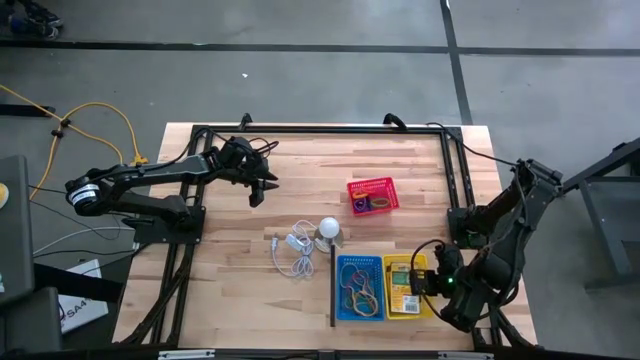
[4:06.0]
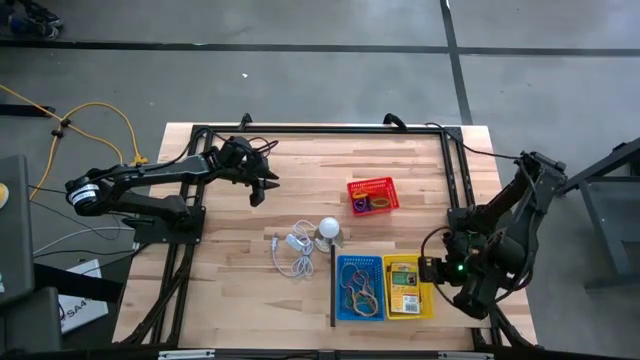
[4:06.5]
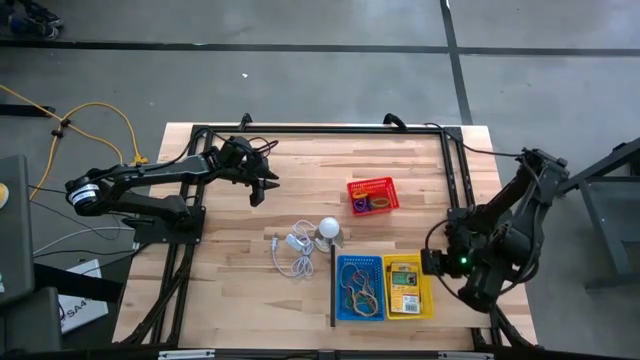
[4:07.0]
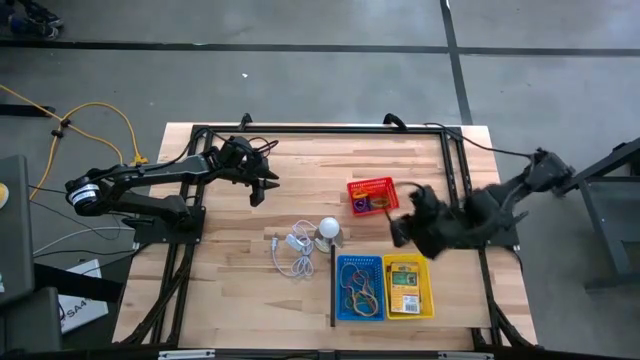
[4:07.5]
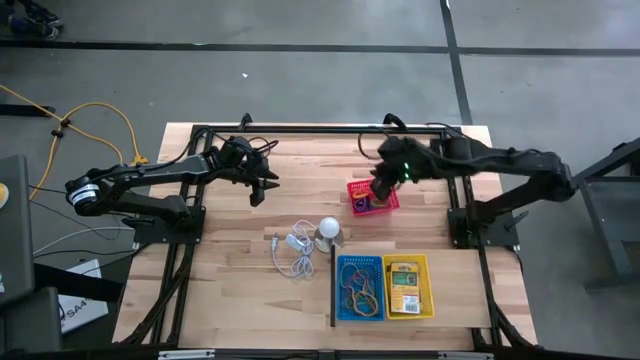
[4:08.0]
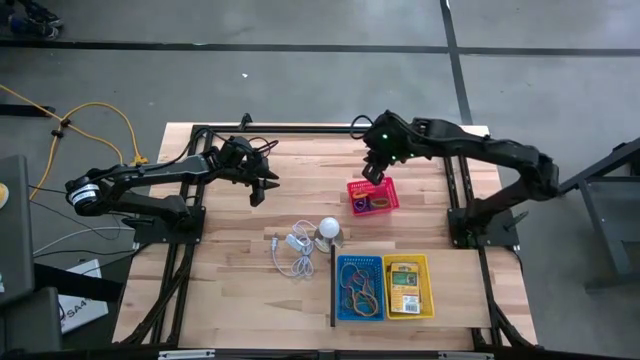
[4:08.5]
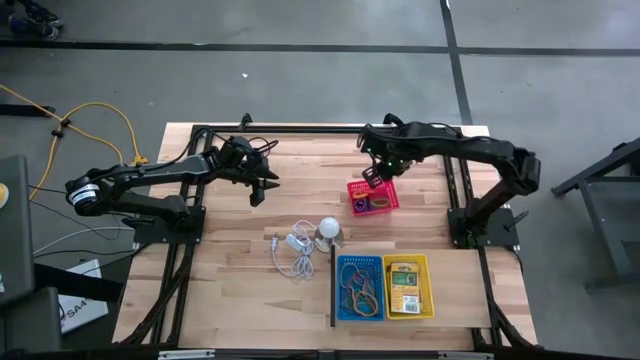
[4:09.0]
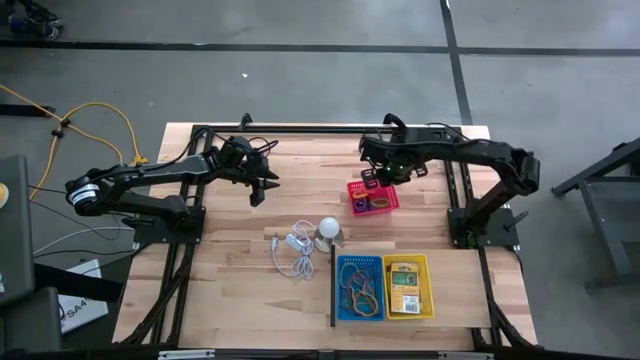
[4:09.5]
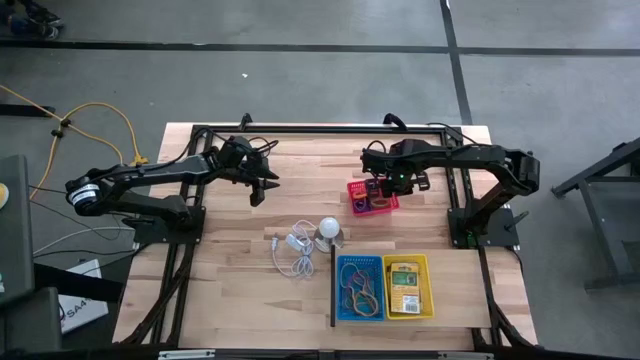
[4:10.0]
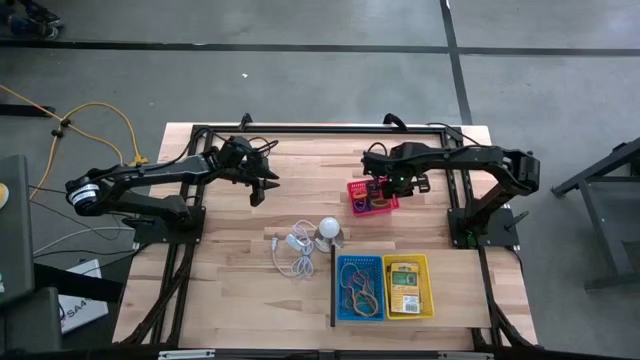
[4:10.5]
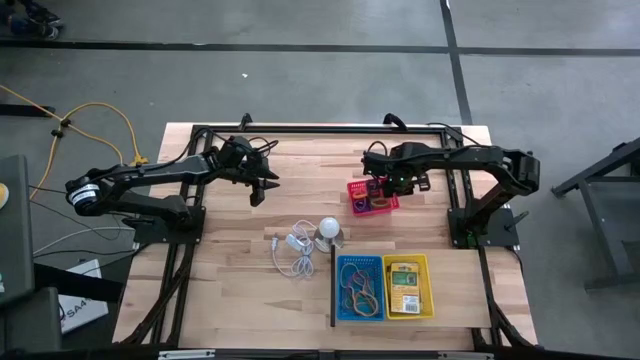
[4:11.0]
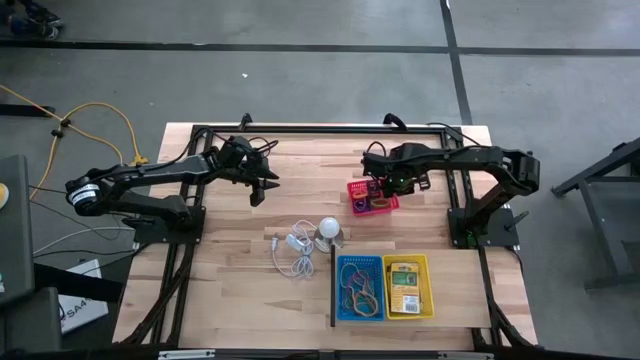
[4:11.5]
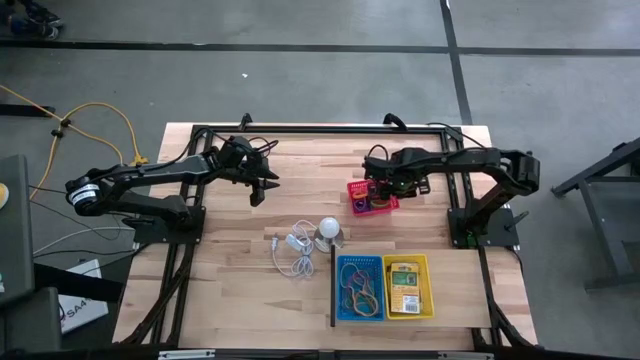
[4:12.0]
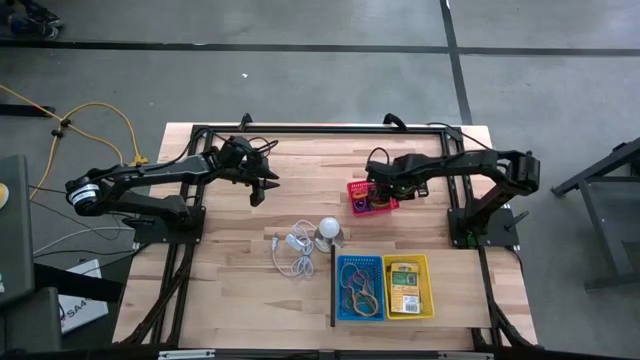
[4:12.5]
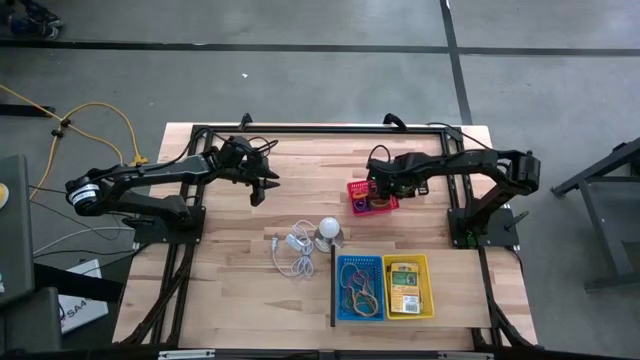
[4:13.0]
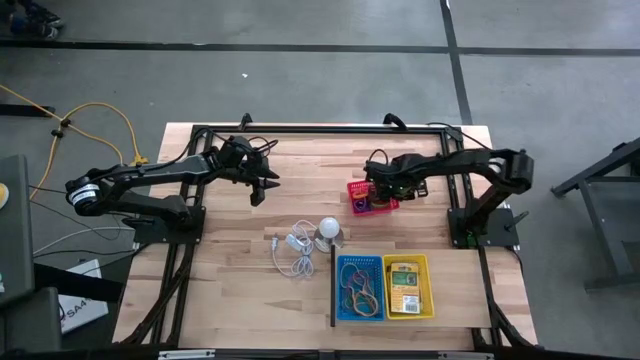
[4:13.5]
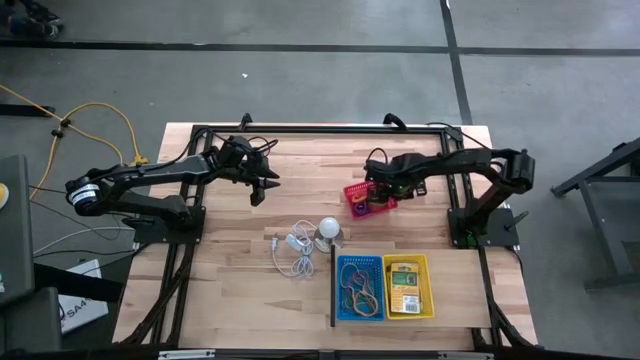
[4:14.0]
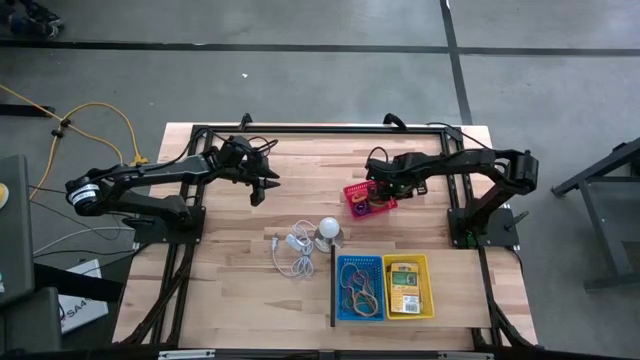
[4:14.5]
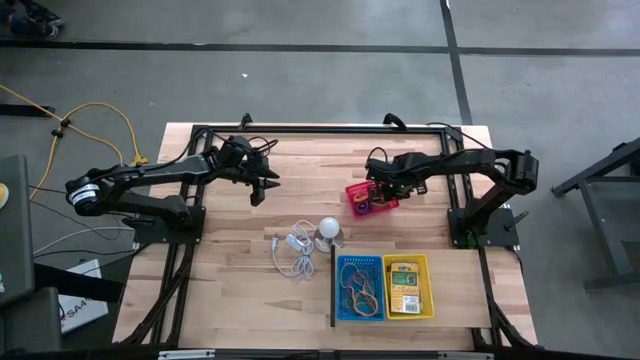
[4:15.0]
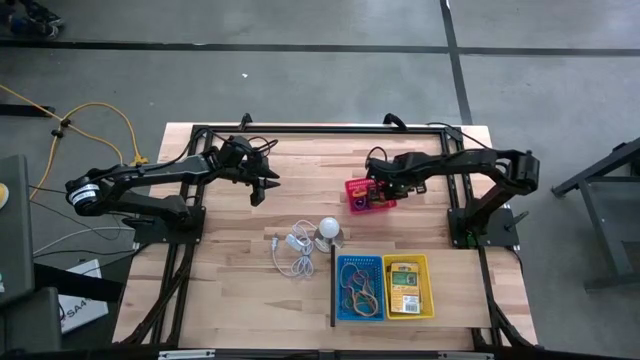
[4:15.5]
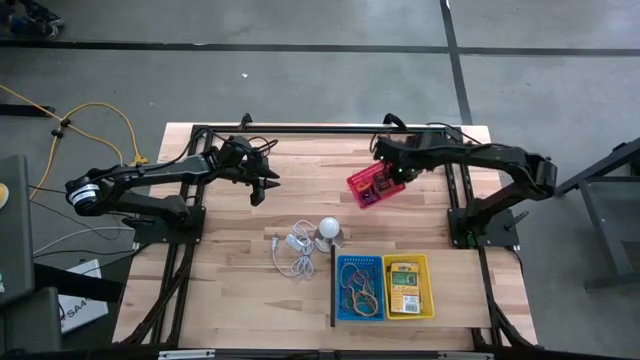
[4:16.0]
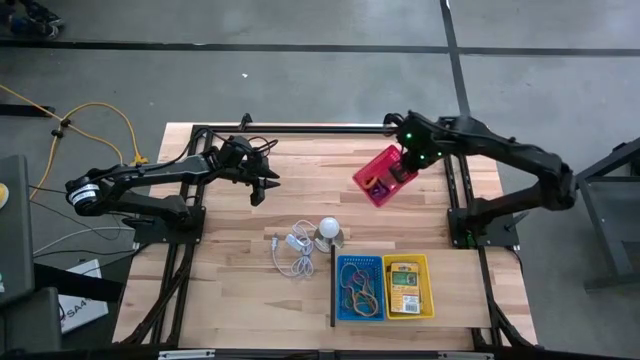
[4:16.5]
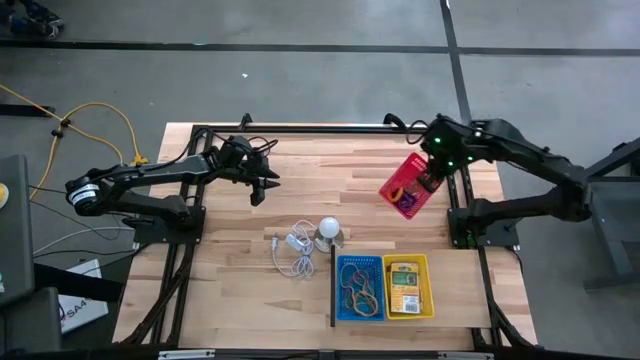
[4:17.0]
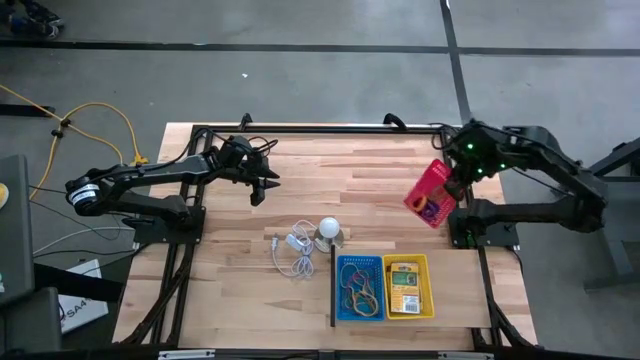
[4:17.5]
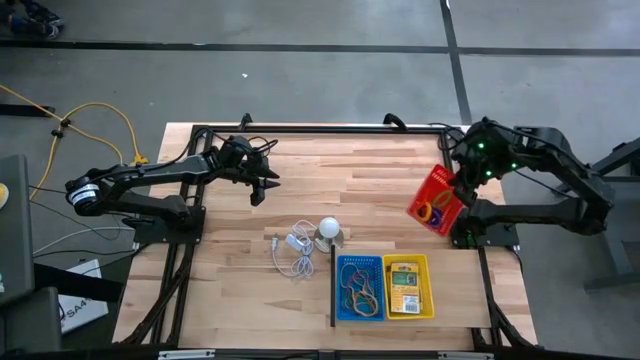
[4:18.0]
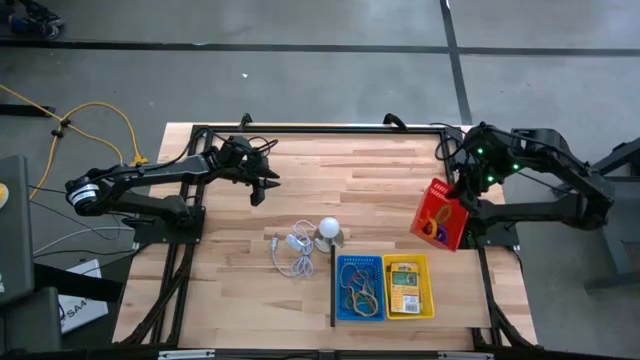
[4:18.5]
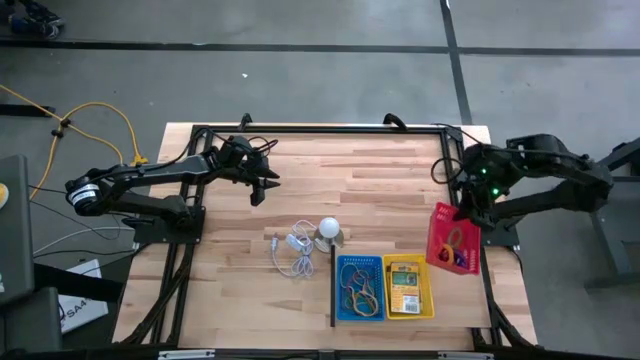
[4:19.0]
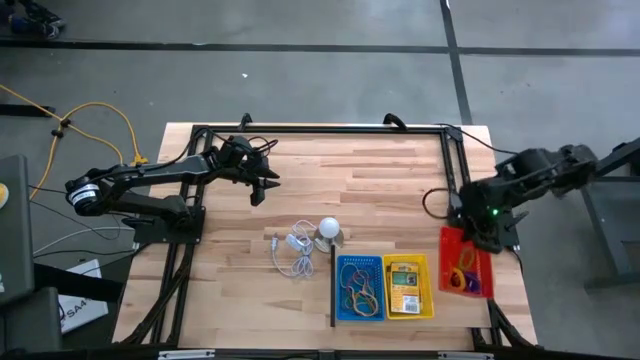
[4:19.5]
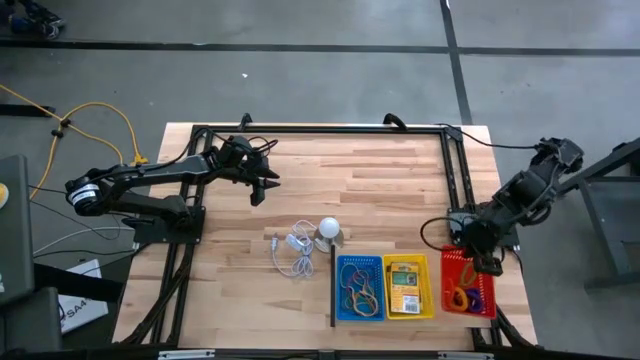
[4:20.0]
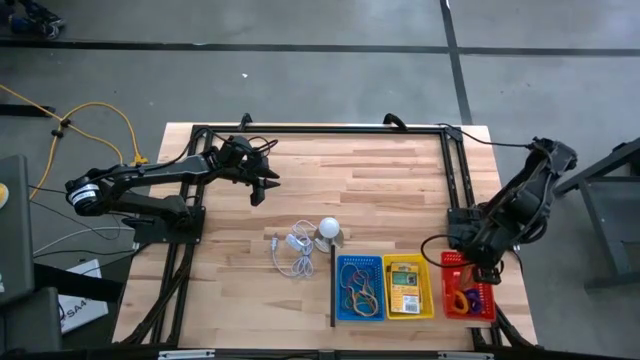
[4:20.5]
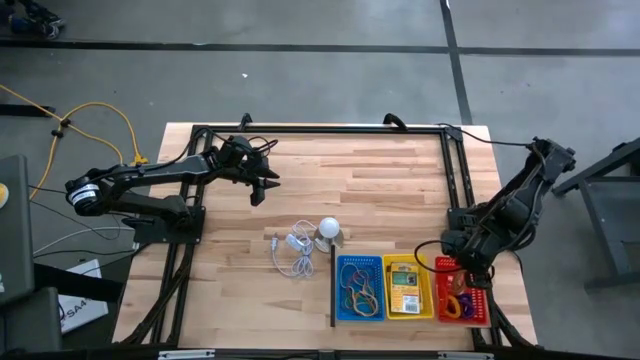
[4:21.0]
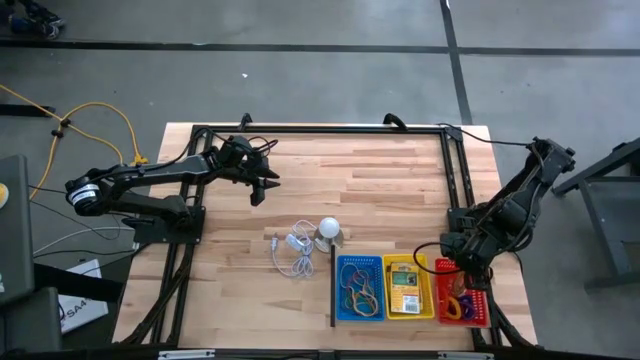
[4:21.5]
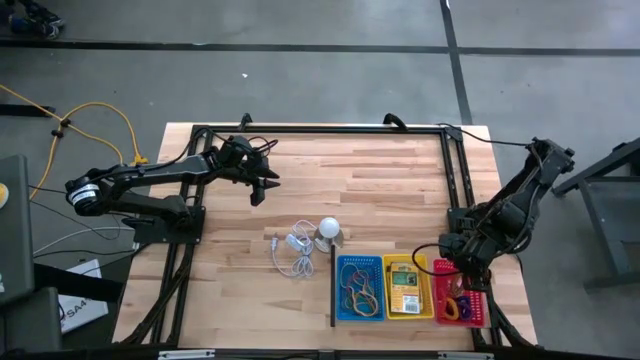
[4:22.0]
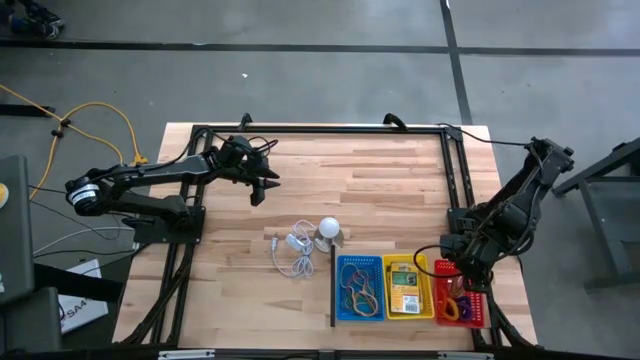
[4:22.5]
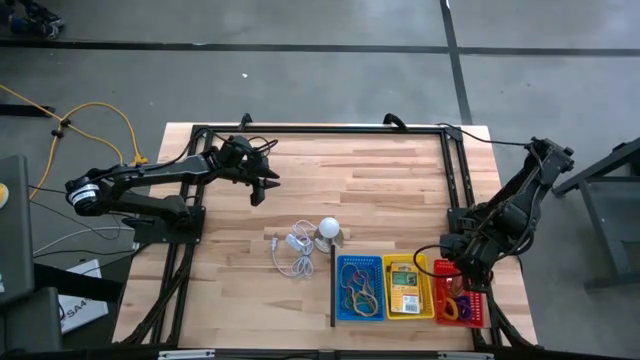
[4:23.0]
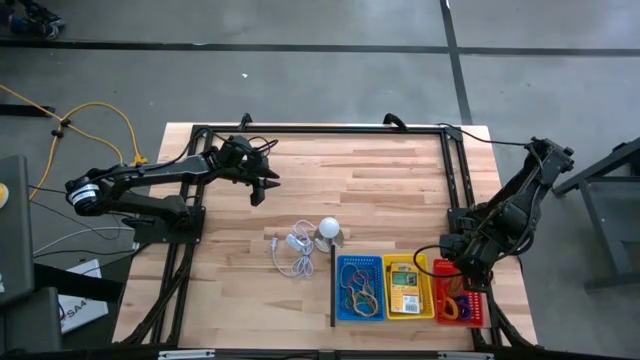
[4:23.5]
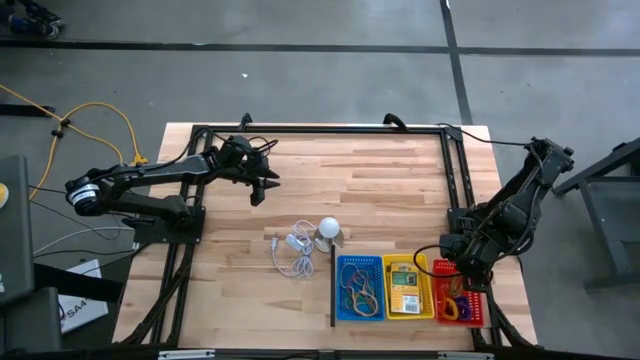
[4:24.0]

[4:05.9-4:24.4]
Task: Pick & Place Office Desk Supplies
Put the red bin with the coil keychains on the shelf

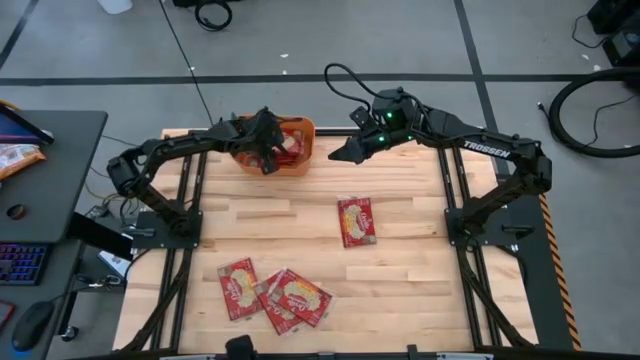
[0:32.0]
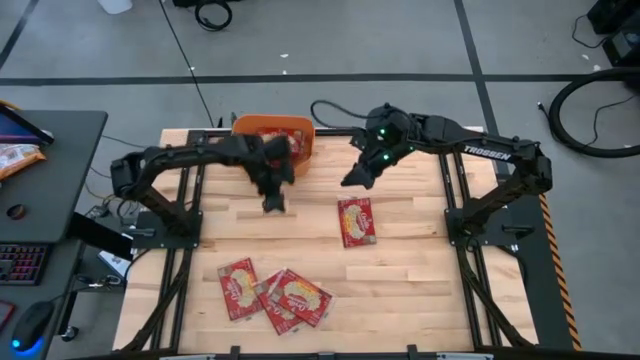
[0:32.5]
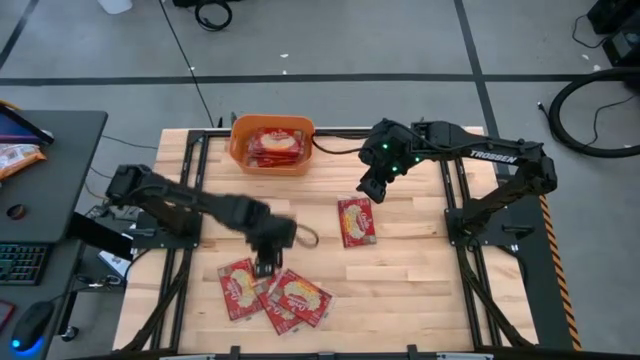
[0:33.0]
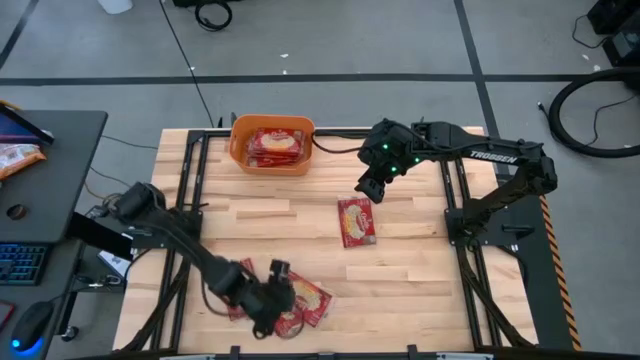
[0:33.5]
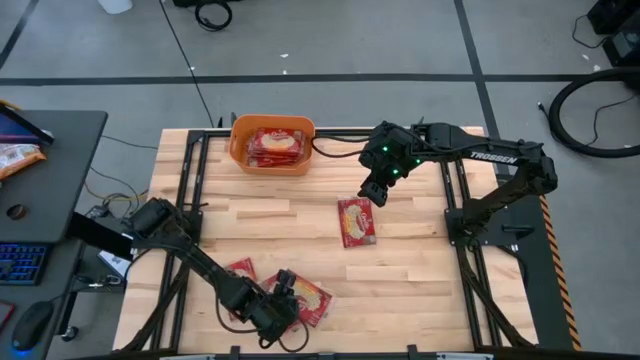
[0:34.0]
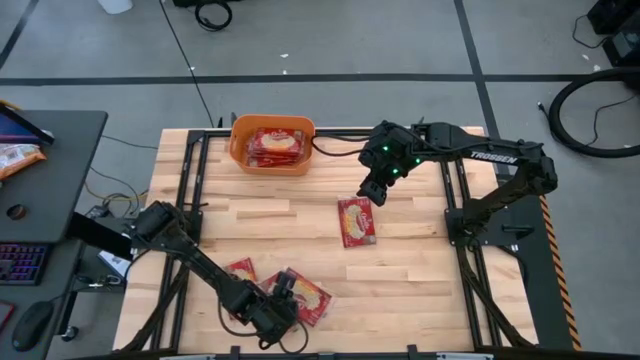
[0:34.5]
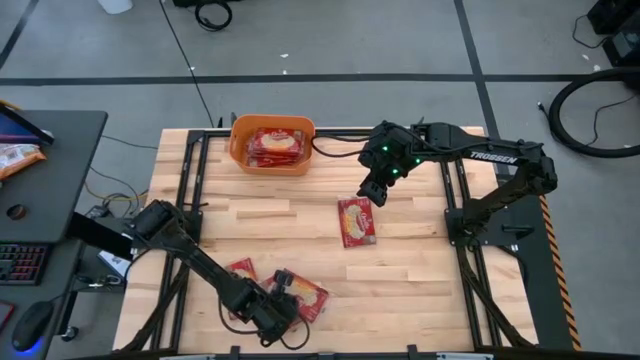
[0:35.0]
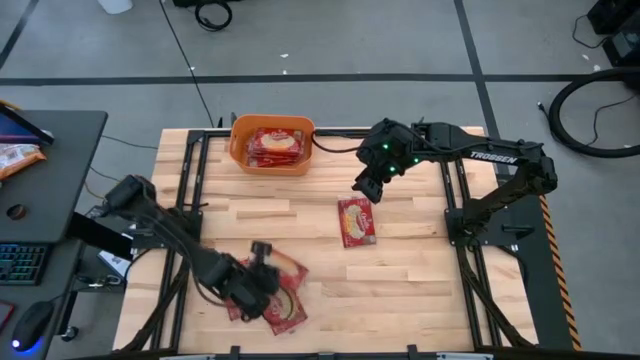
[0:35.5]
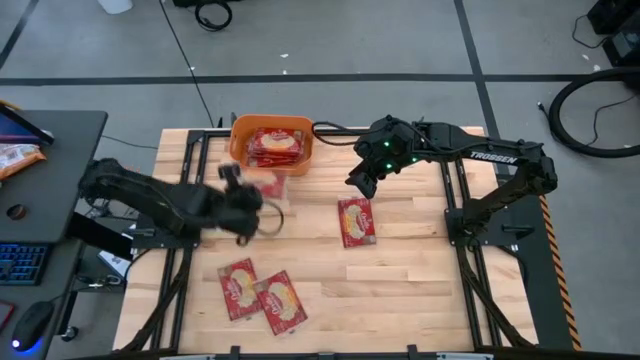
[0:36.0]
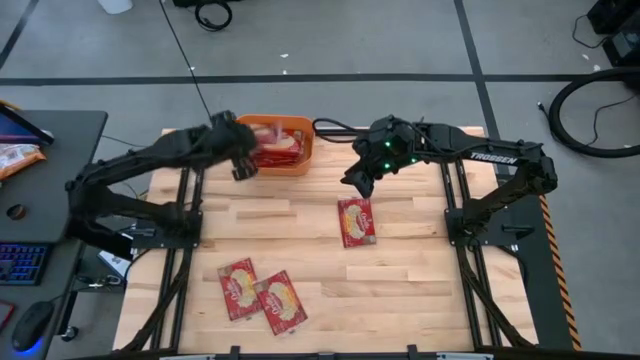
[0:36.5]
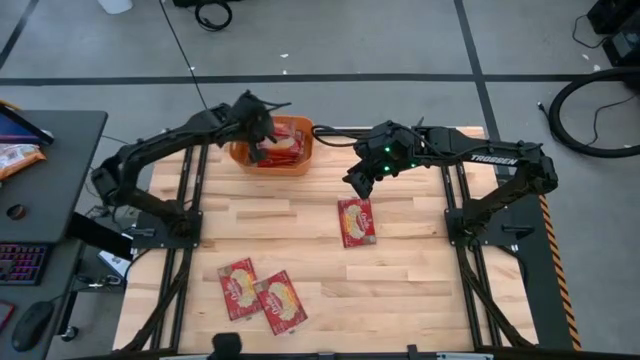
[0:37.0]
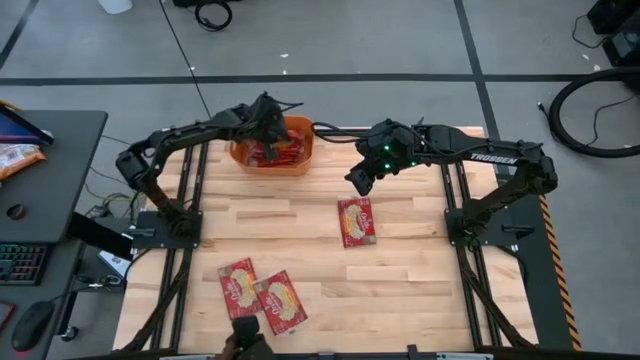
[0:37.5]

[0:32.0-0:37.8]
Task: Sort popcorn bags into baskets
Put the popcorn bag into the orange bin
